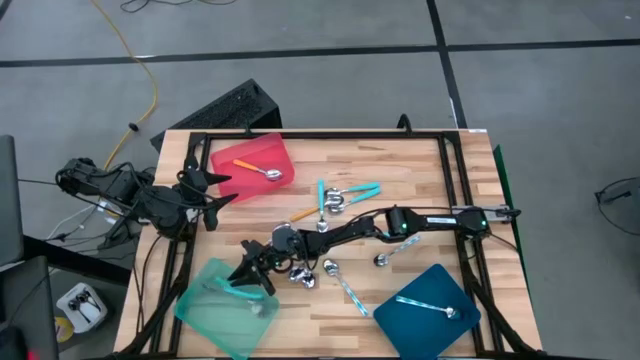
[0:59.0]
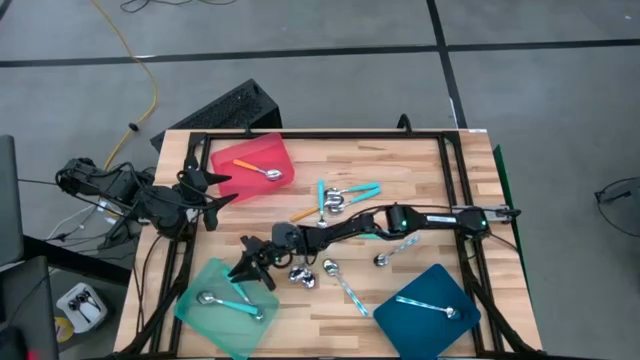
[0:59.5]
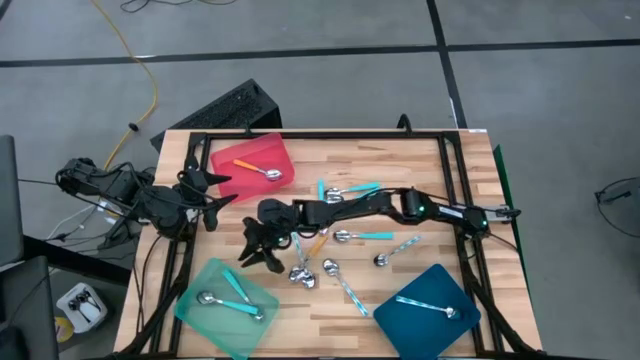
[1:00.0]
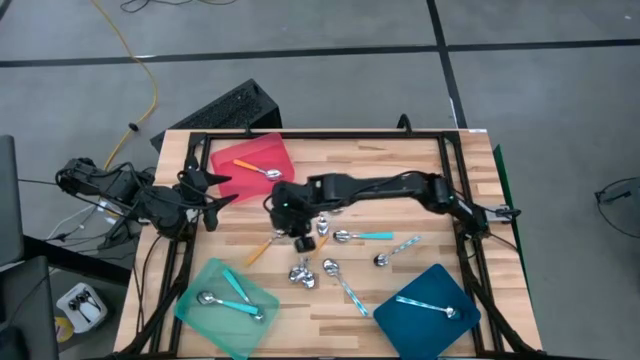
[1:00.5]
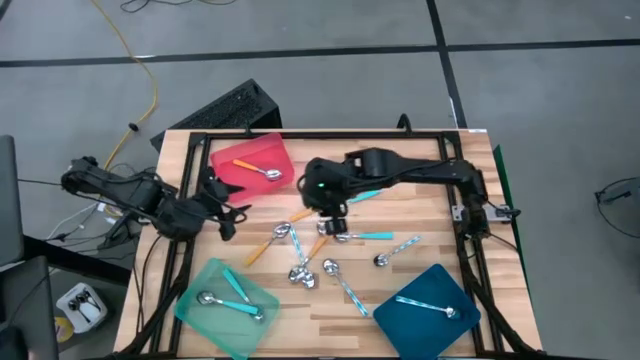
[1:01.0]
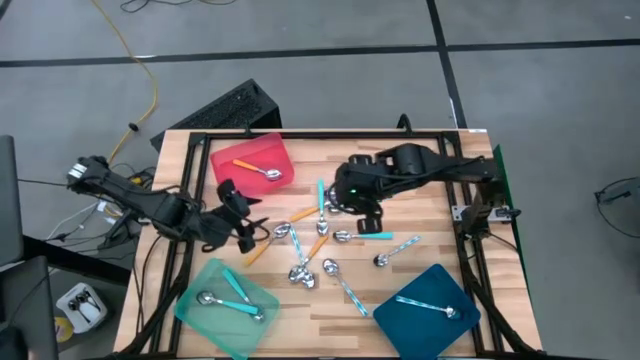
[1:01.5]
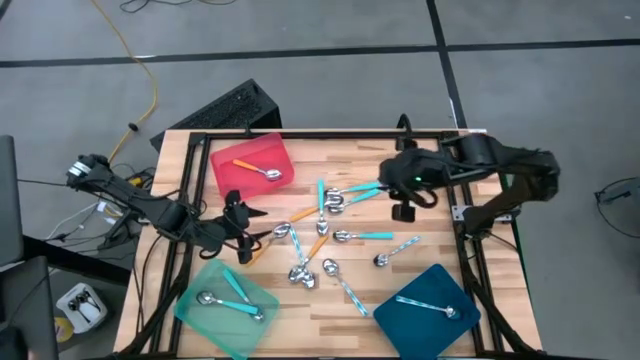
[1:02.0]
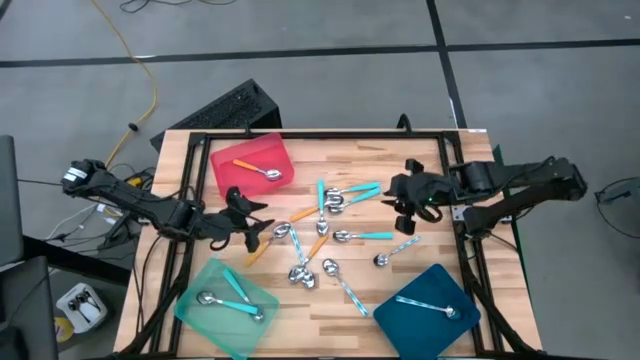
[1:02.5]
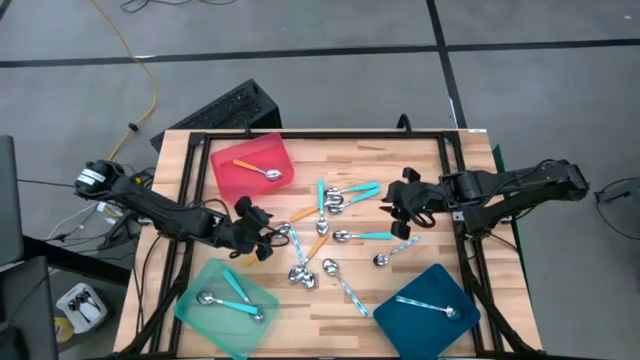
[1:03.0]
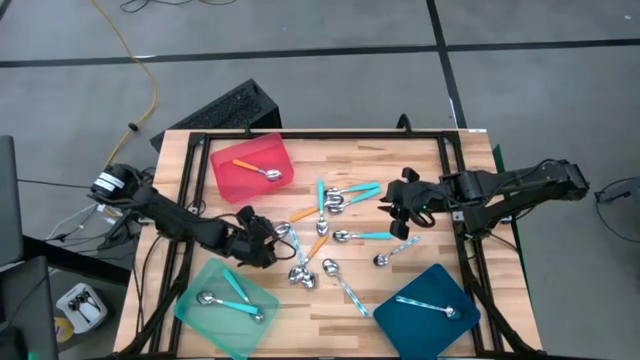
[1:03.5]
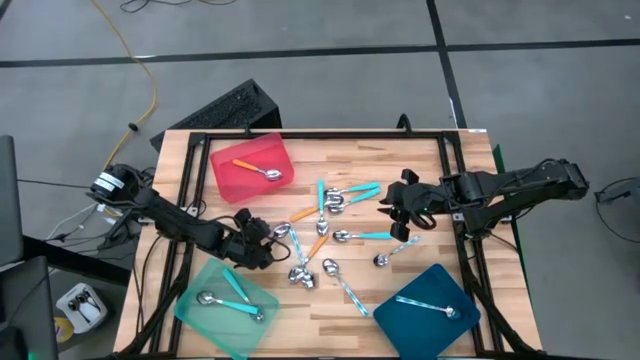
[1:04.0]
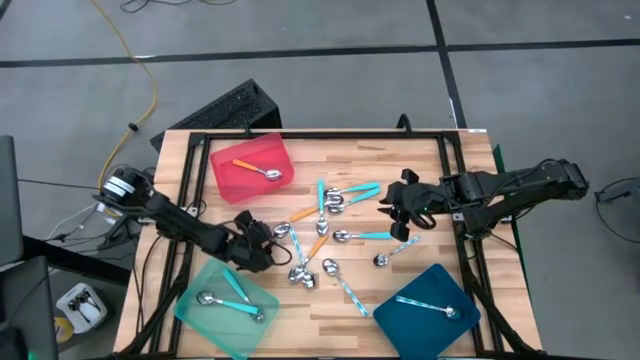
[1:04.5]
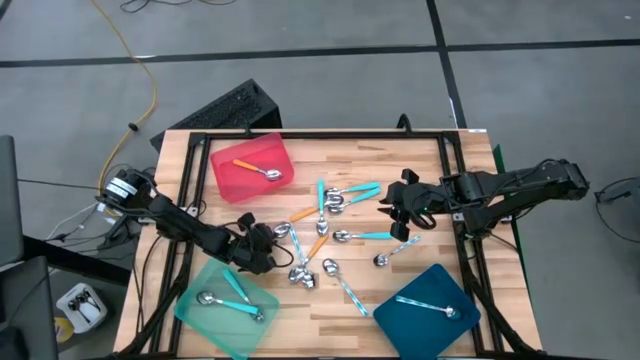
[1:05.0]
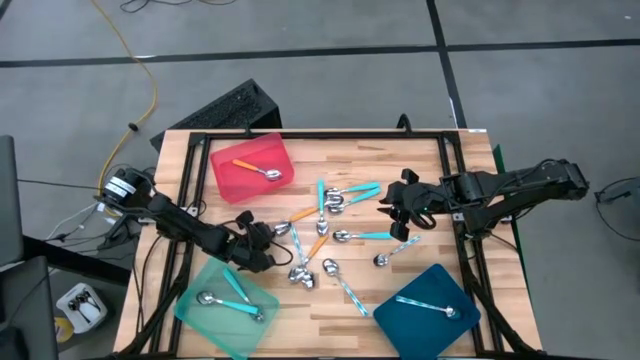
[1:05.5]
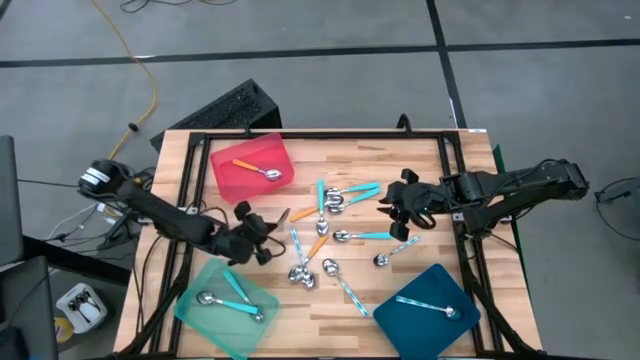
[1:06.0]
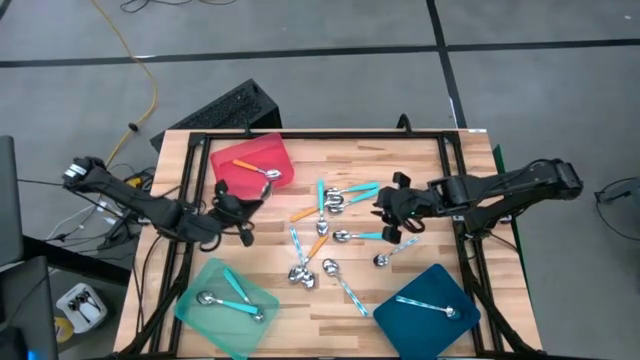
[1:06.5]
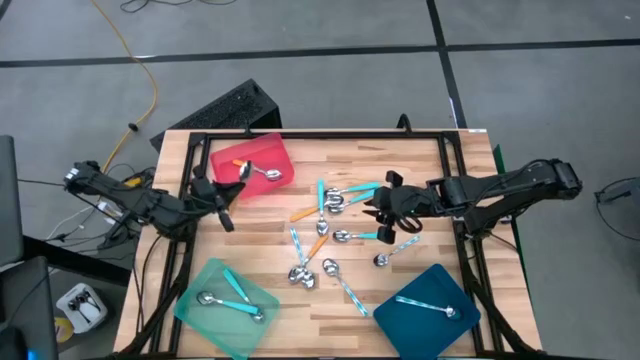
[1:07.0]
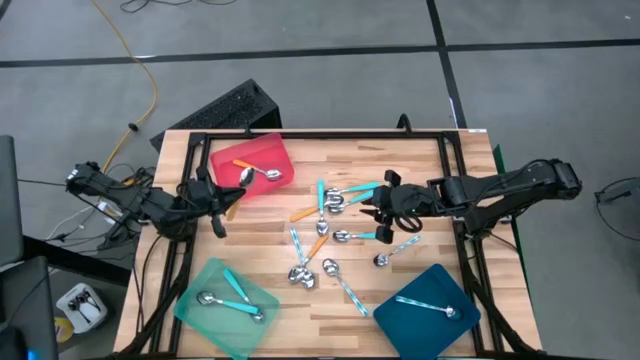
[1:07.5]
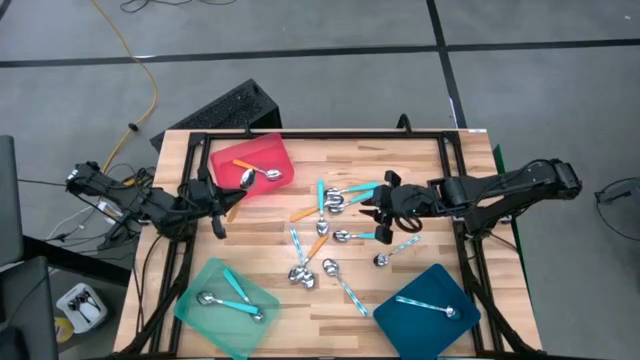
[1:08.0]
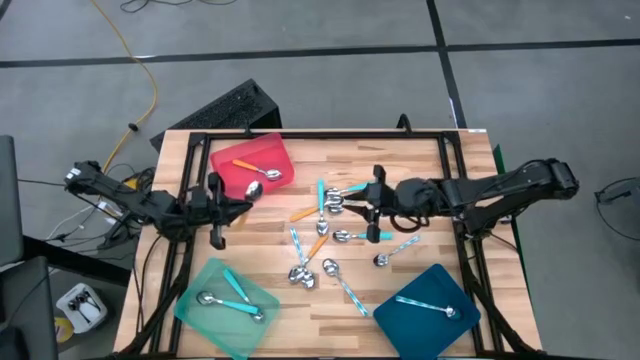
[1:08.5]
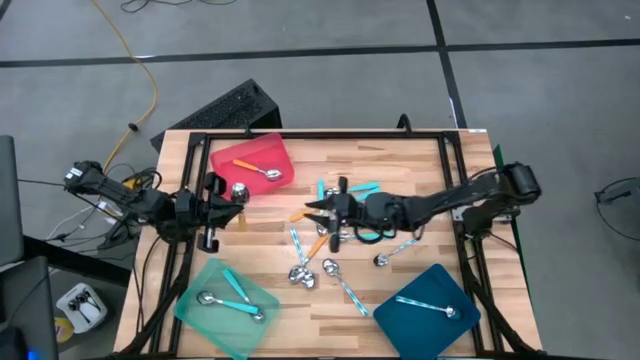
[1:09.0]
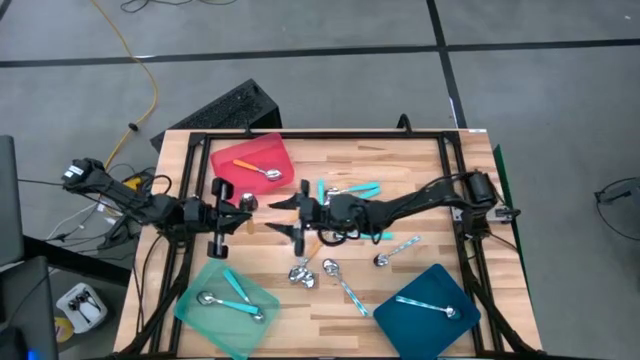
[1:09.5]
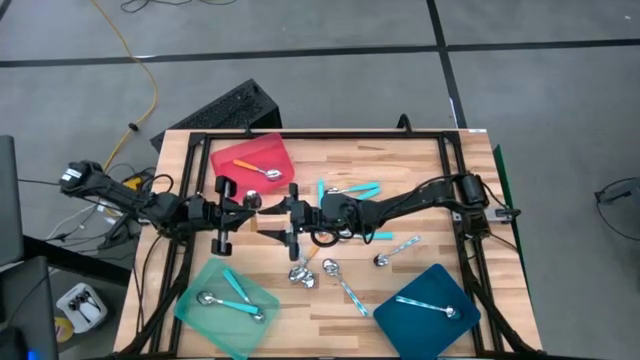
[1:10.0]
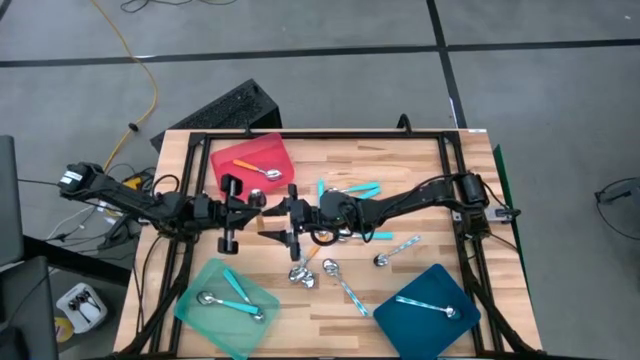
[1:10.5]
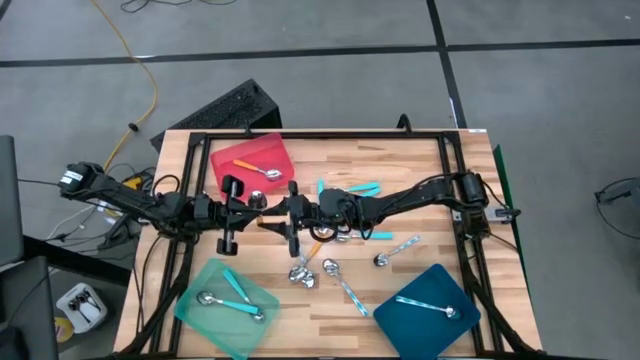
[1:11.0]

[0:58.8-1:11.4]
Task: Sort silverware by color (type)
Put the yellow spoon into the pink bin

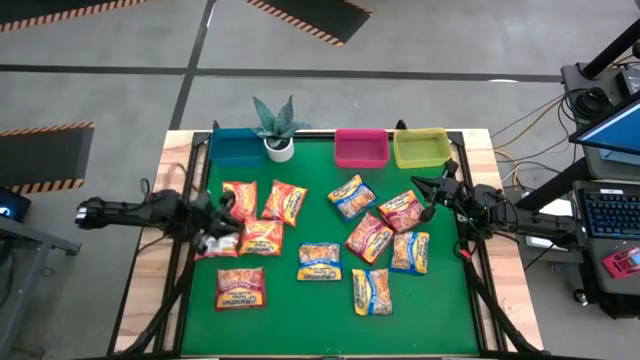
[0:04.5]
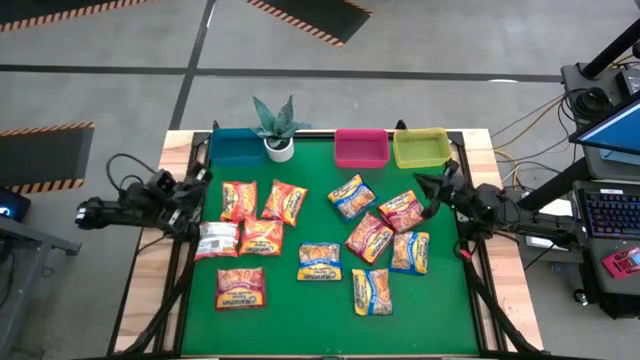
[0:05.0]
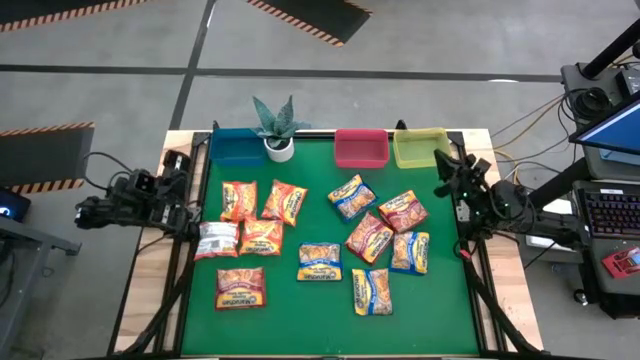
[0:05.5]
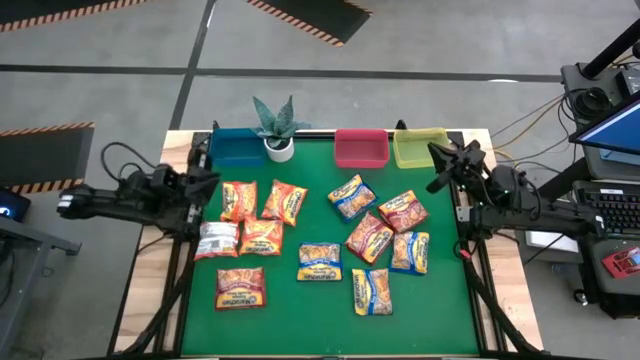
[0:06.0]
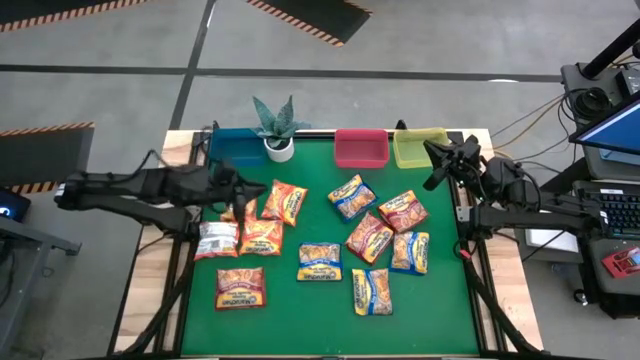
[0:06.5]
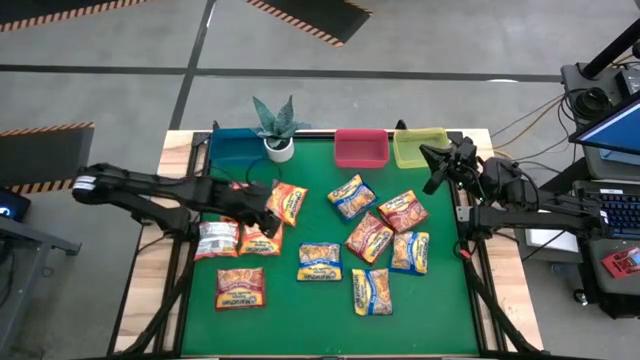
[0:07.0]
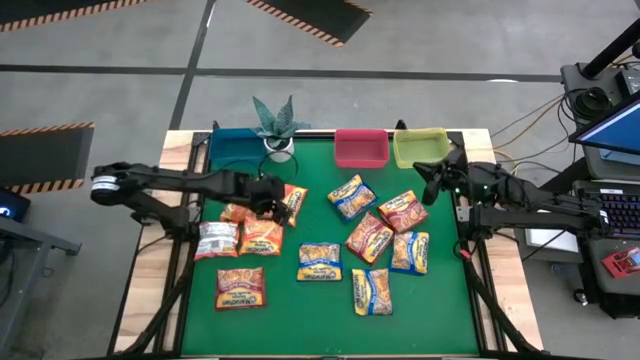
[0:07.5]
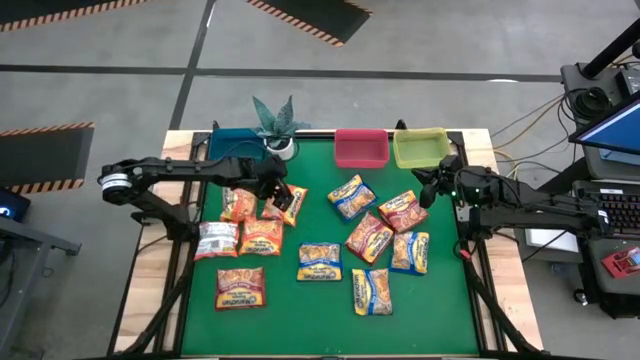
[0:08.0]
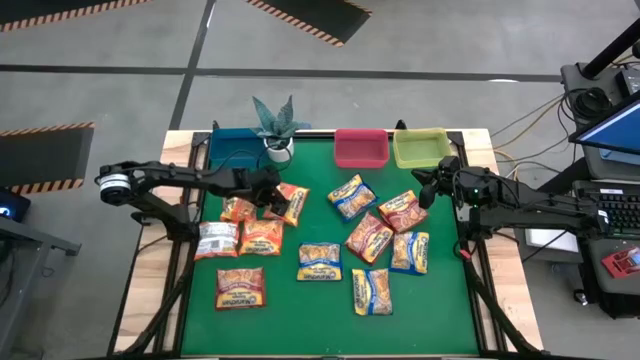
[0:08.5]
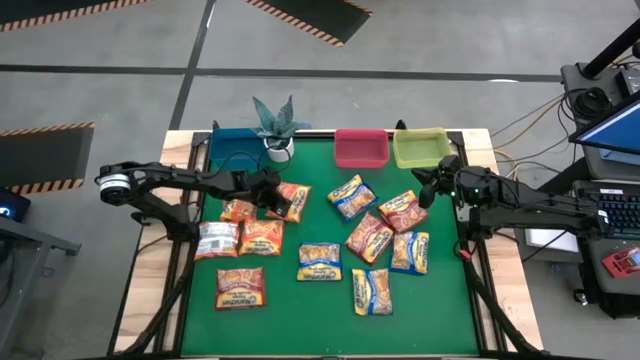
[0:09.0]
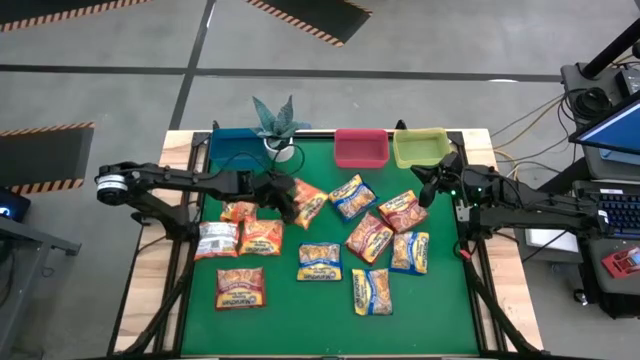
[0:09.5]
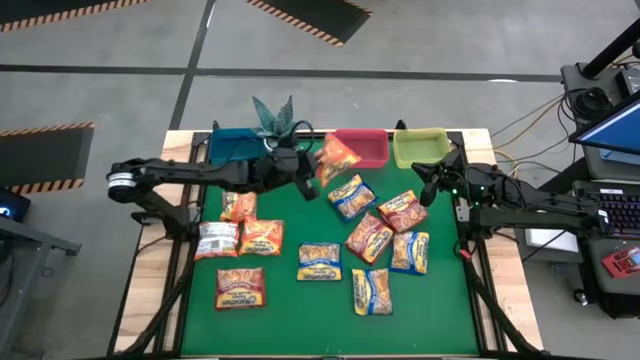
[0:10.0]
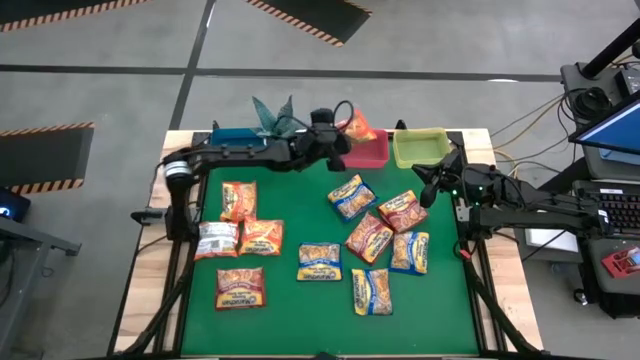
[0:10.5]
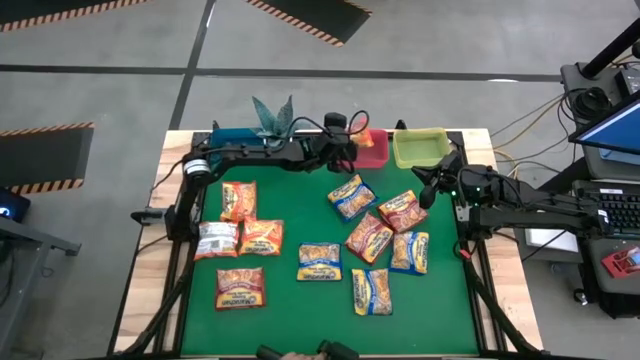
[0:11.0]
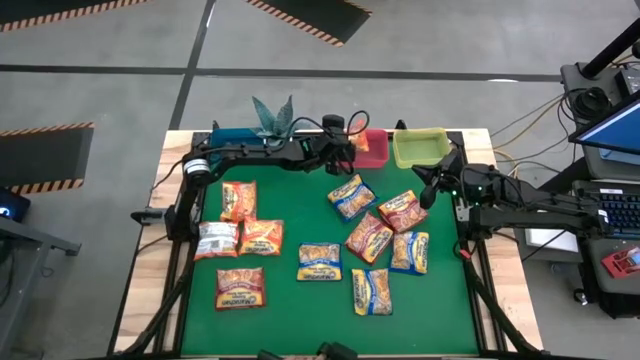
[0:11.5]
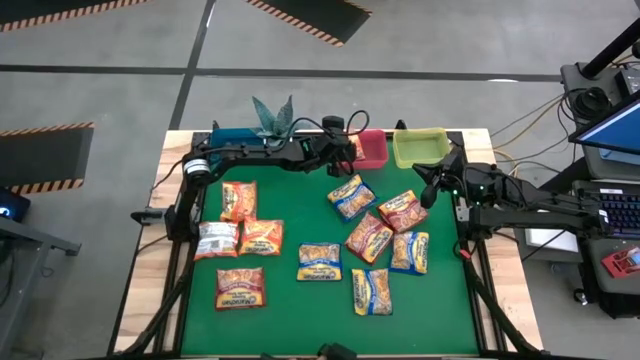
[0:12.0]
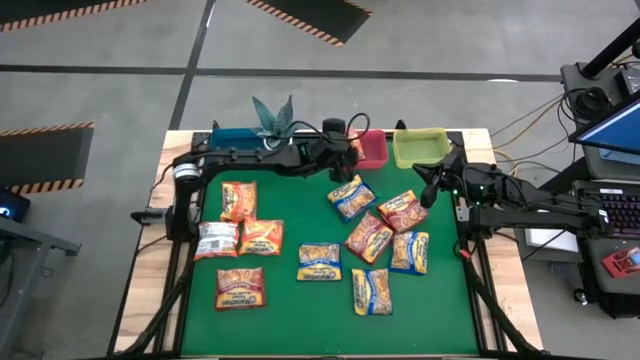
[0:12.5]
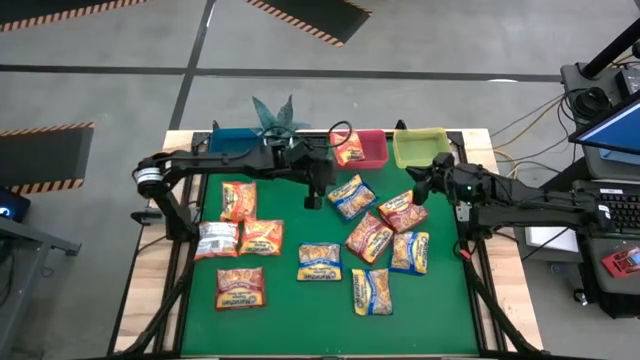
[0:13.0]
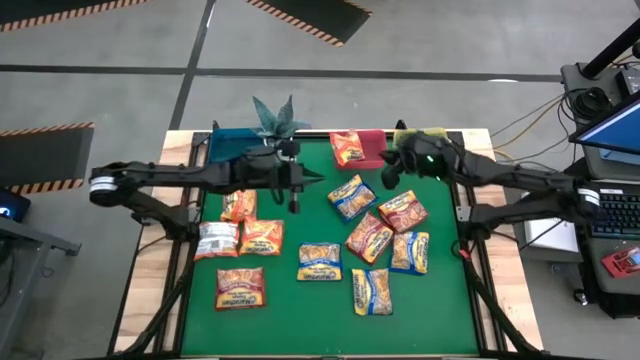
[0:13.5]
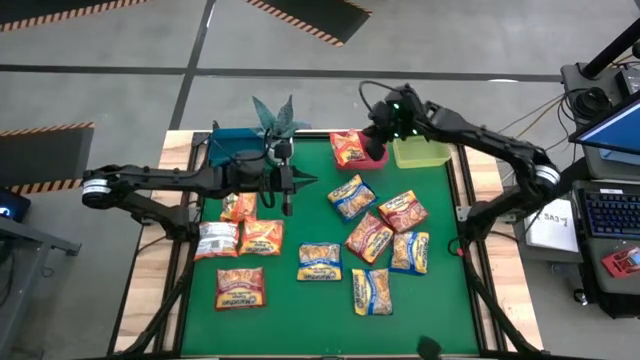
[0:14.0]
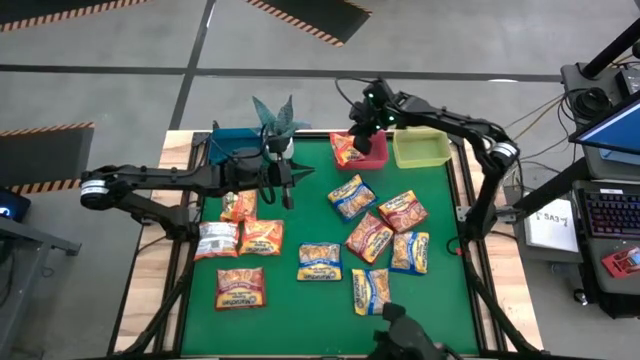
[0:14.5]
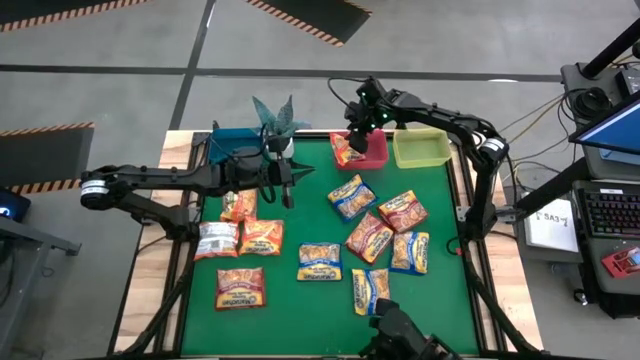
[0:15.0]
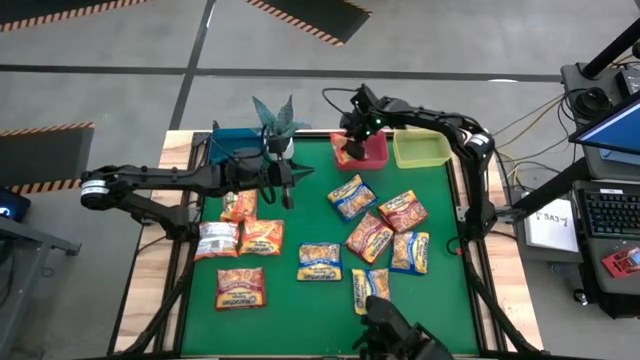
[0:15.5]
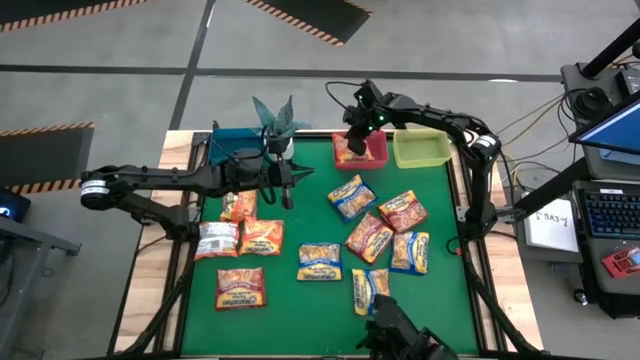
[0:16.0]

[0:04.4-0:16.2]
Task: Sort Maruchan noodles
Put the orange noodle pack into the red bin
